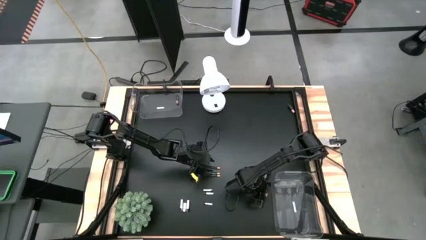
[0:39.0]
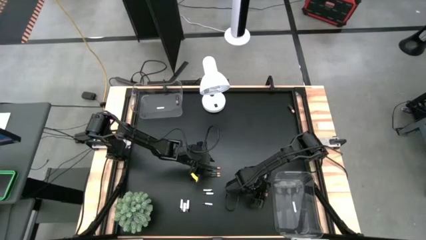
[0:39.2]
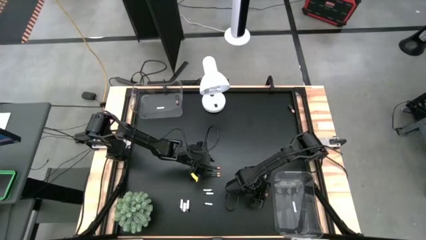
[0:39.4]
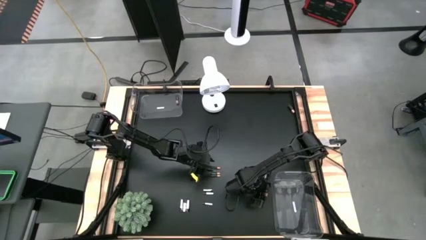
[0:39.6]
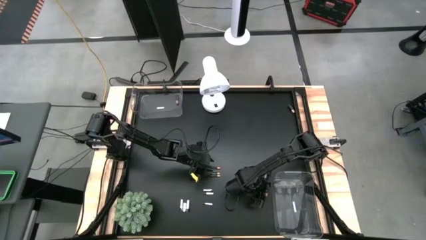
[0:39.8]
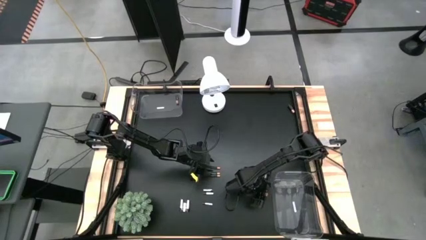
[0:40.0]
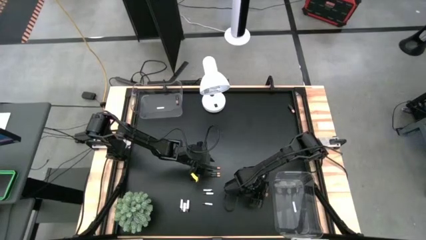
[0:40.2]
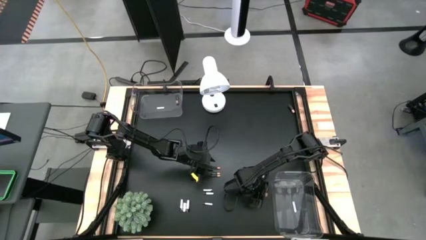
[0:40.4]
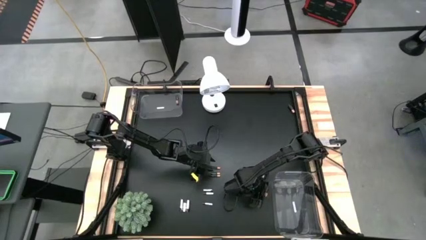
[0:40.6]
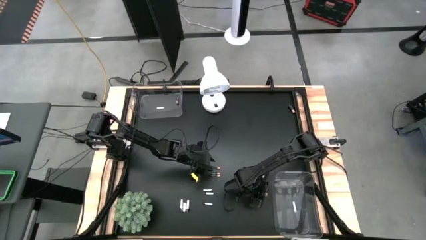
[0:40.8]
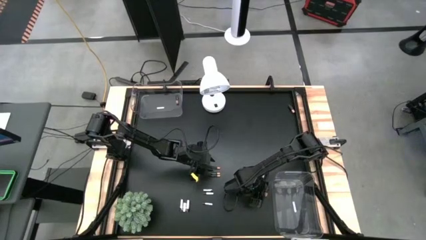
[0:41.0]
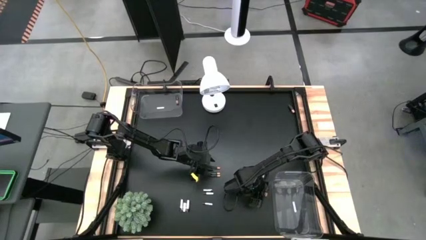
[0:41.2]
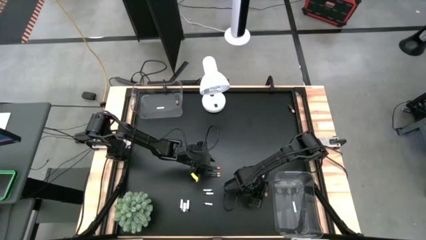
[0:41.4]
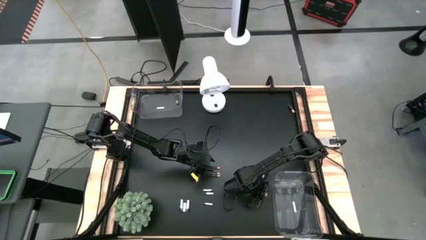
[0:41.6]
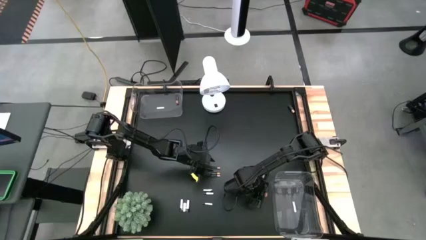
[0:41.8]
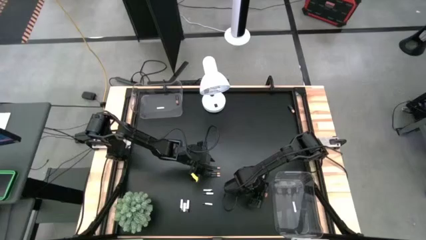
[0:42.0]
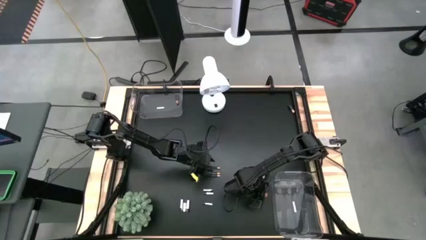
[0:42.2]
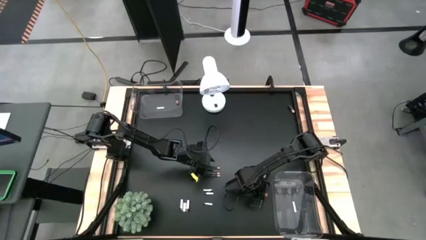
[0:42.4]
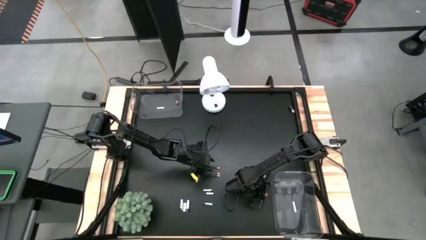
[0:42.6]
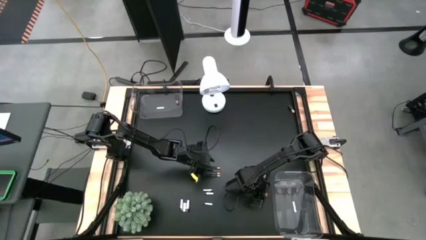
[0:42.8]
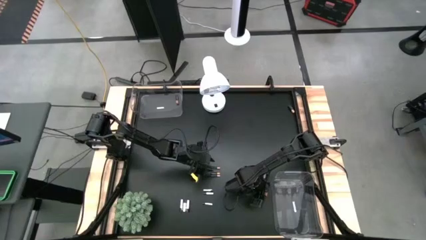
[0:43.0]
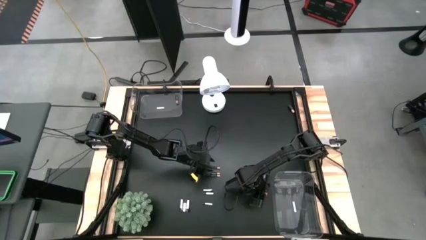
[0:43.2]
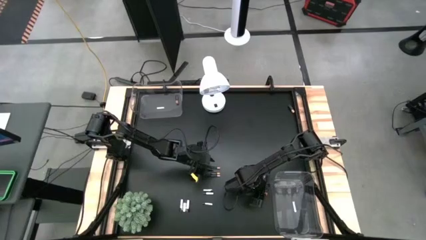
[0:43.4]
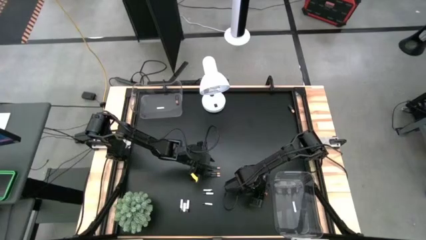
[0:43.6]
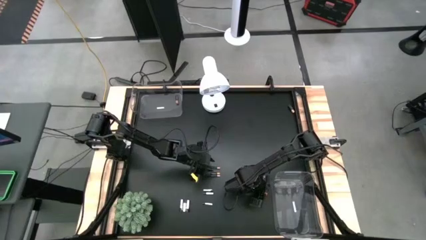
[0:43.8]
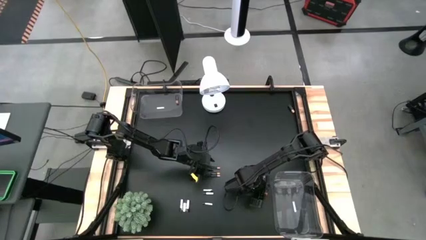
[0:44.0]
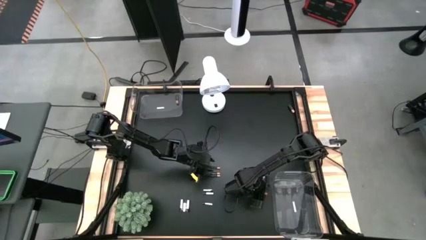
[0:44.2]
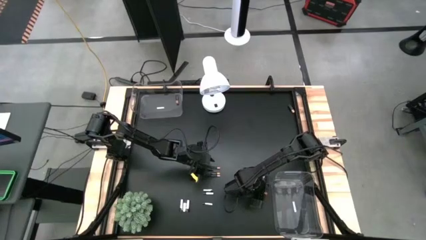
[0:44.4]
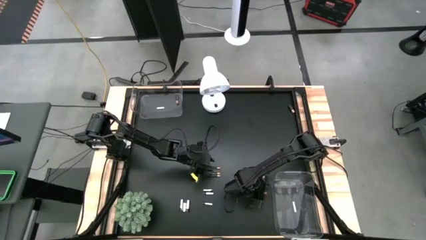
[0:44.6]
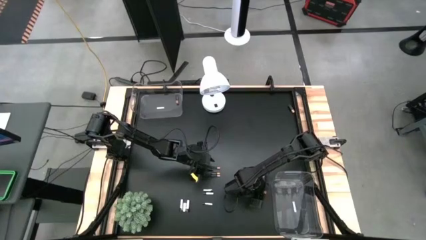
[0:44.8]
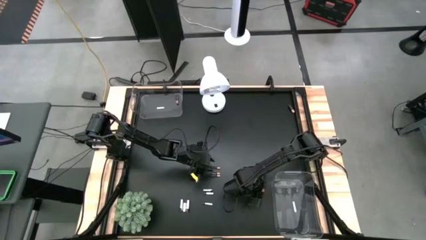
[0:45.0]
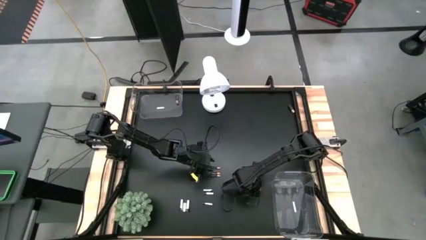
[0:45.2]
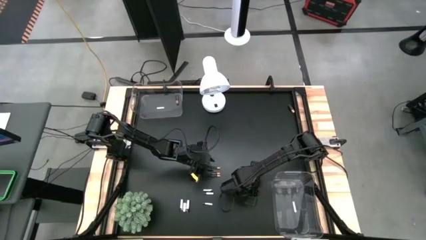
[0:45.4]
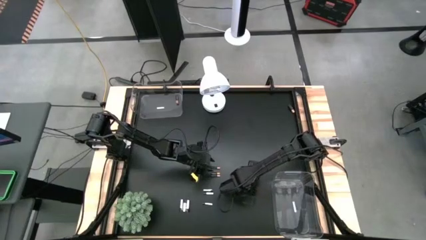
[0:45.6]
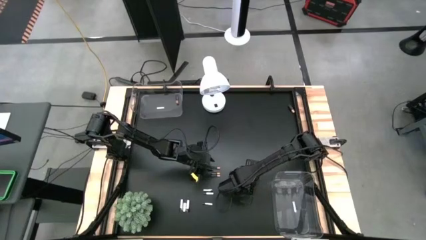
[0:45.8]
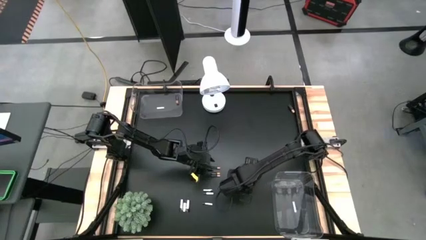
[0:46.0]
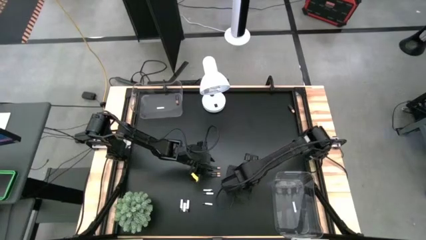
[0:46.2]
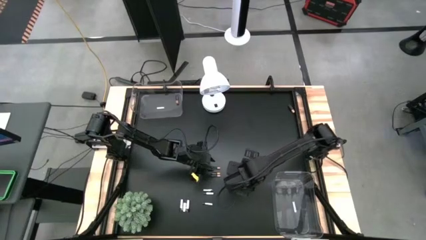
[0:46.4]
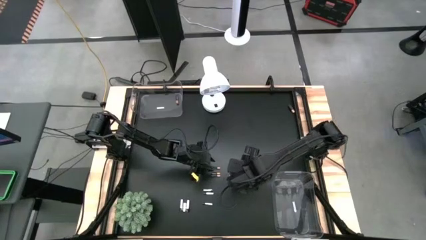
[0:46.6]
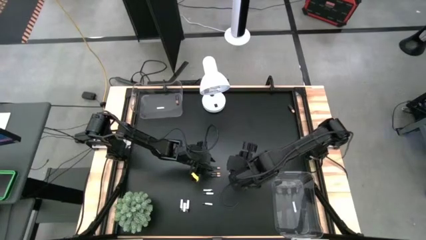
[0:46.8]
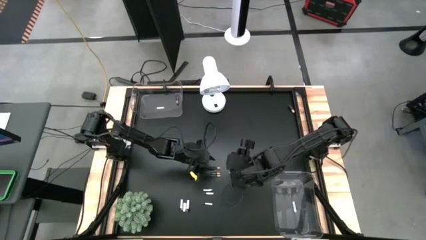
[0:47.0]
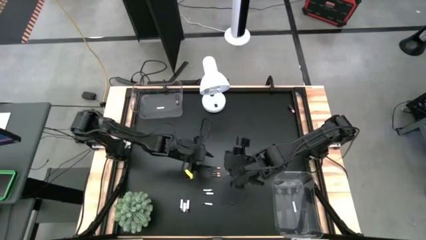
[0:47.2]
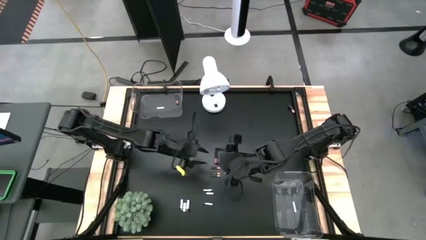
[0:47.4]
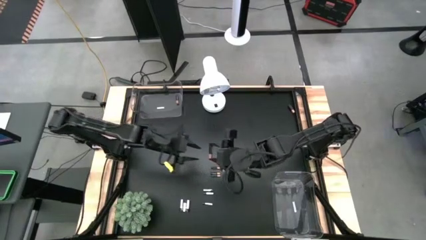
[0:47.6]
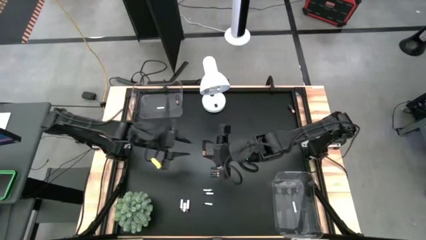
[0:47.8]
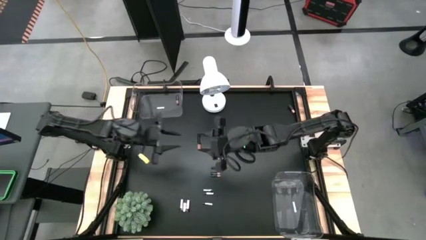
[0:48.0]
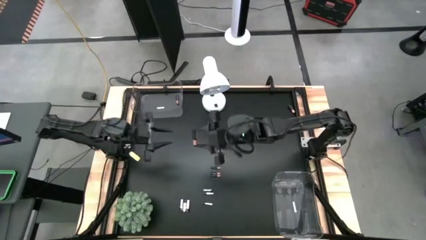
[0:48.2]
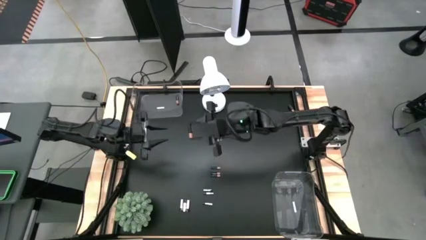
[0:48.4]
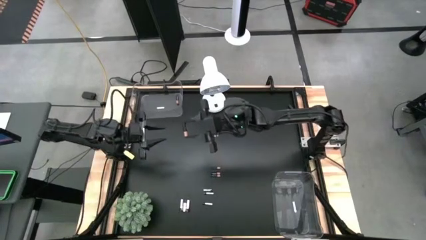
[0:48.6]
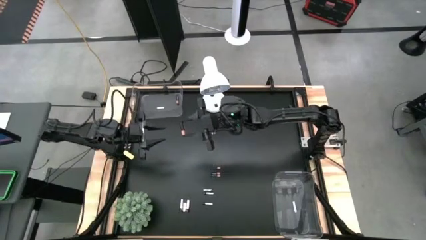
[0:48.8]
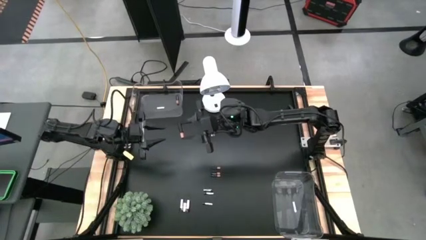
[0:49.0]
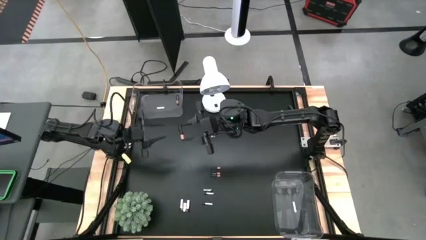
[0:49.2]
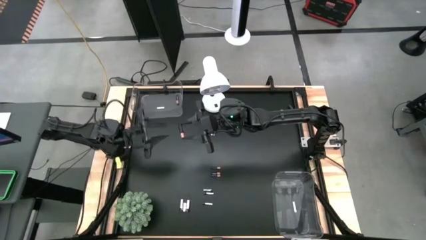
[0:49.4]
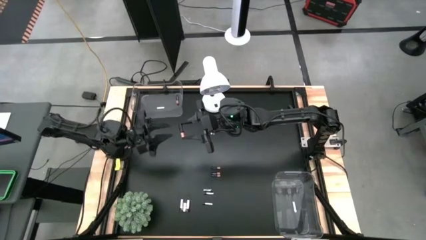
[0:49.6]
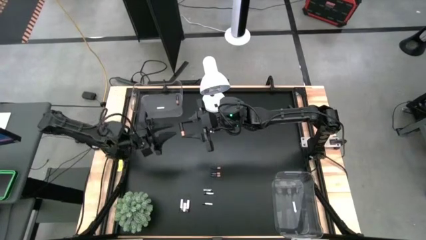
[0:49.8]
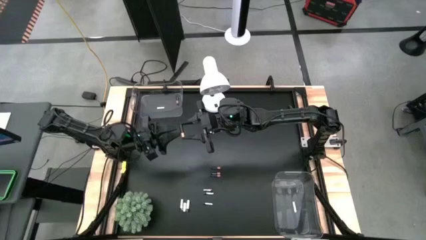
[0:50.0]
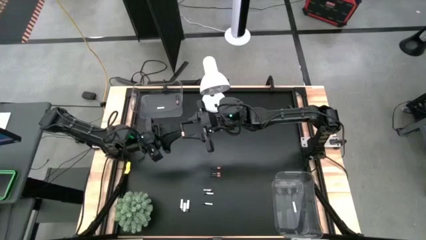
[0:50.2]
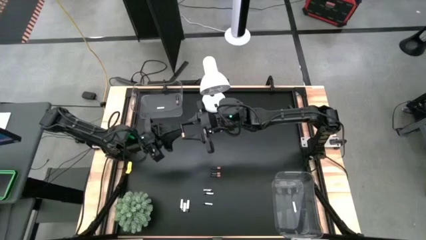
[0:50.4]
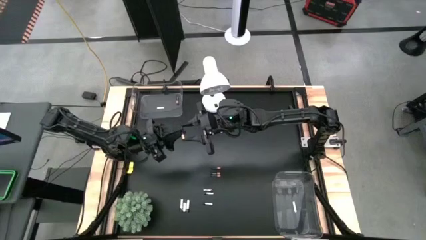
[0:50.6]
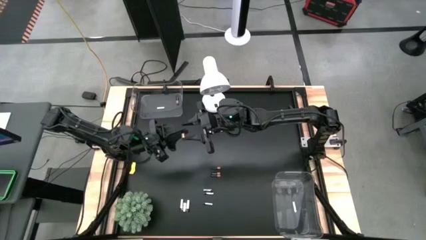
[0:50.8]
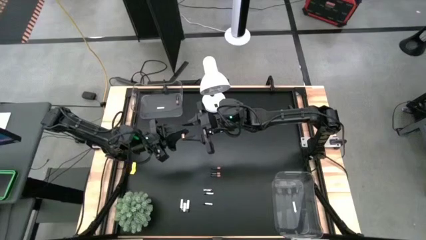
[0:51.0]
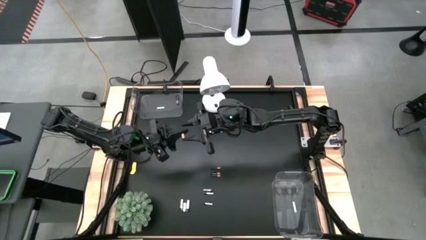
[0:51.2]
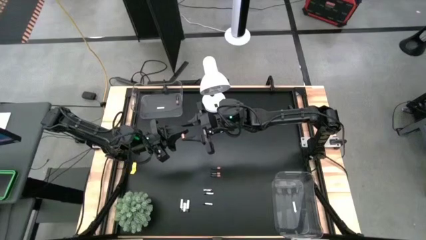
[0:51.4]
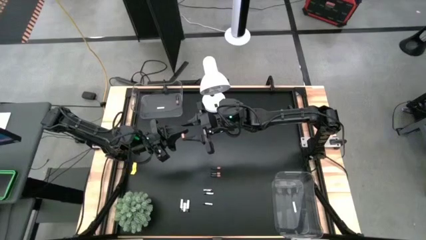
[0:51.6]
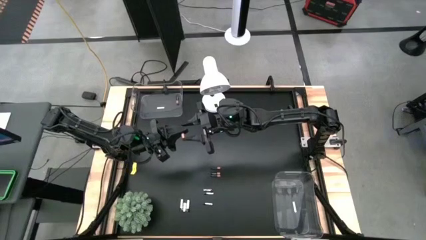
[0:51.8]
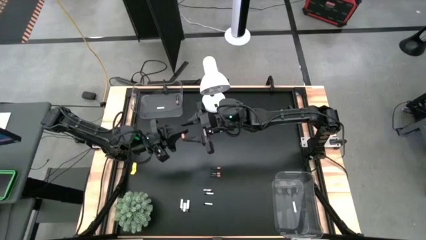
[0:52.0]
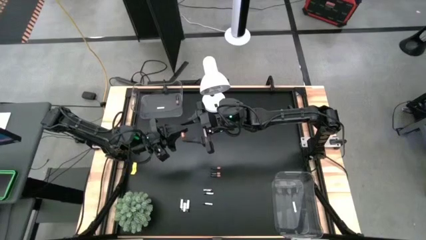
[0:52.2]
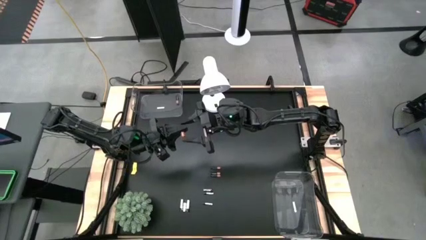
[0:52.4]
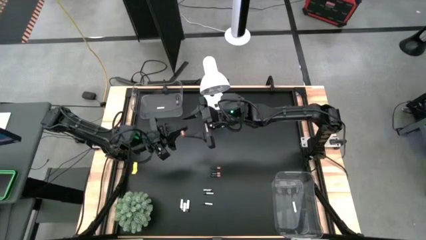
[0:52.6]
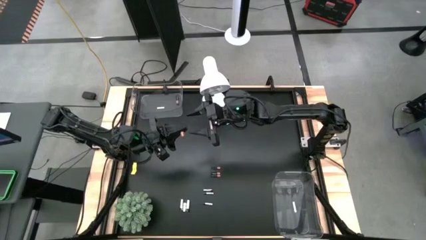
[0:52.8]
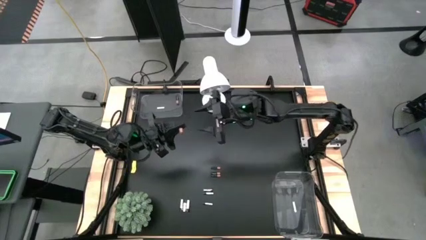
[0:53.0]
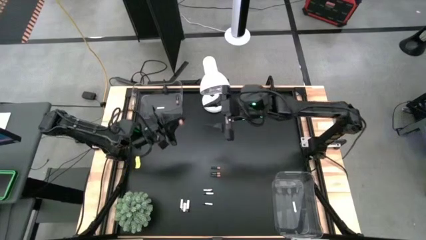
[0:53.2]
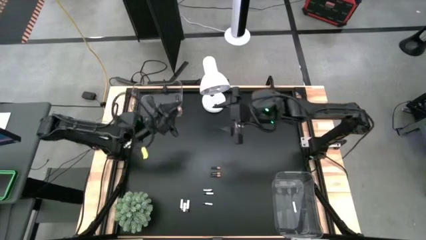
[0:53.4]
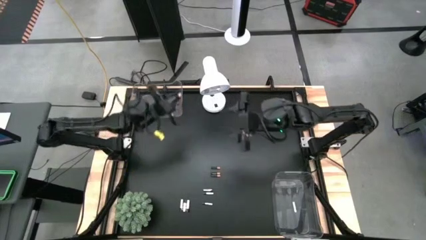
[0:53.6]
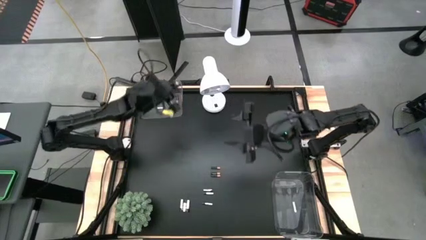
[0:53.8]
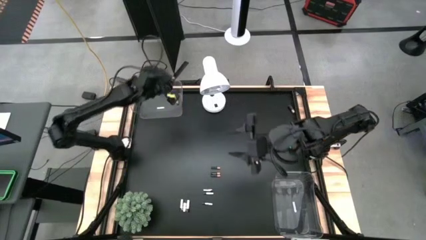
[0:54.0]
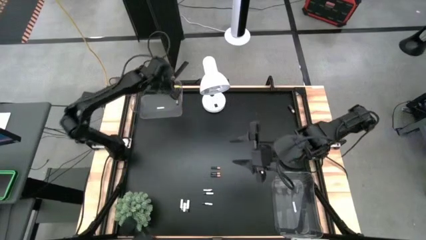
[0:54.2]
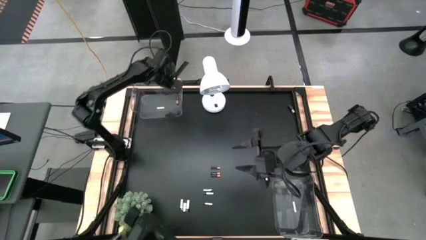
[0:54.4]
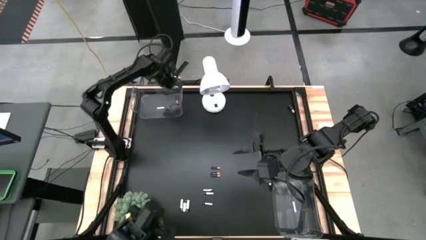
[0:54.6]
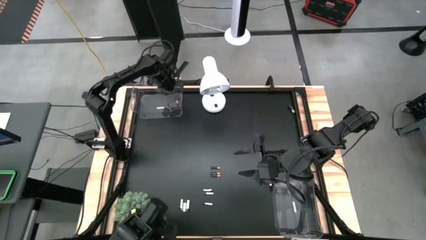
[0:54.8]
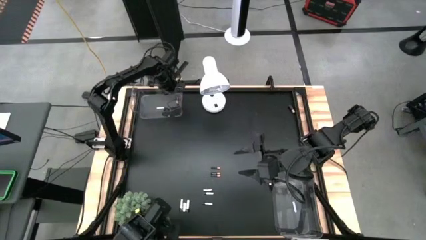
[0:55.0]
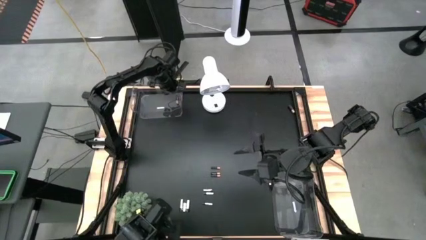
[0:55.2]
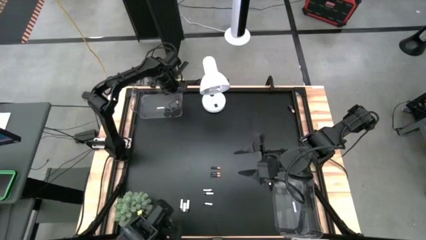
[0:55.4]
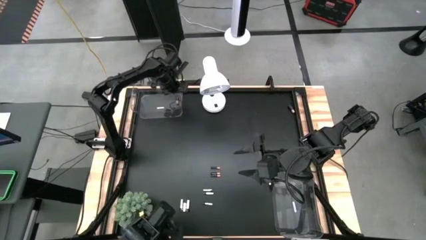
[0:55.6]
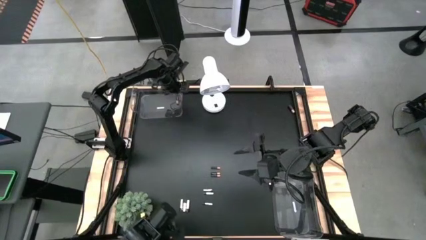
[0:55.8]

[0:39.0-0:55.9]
Task: Sort batteries
Put the black battery into the top transparent bin
